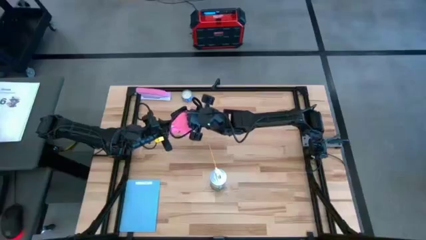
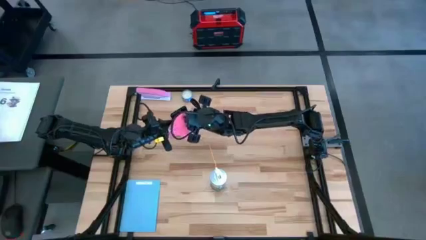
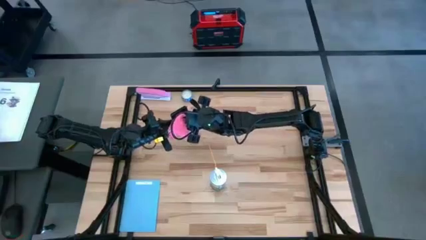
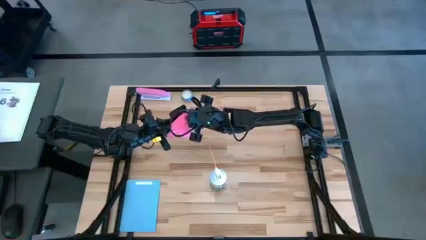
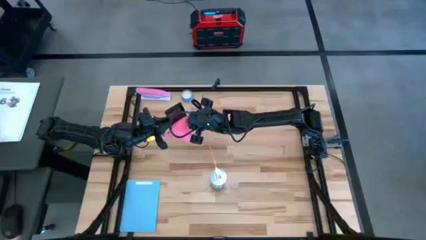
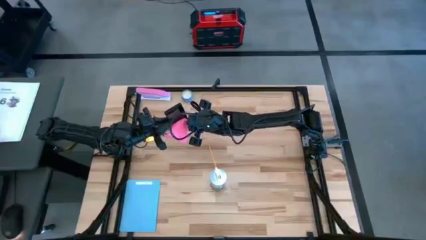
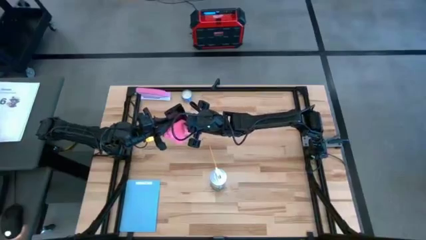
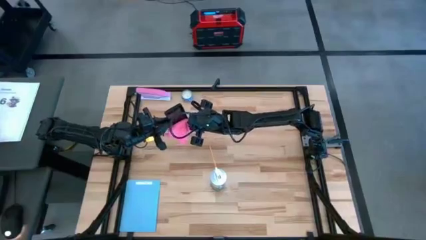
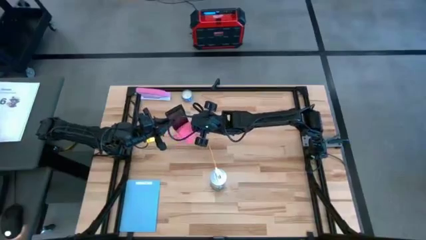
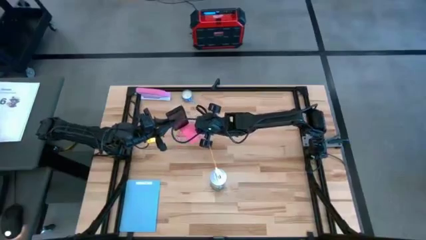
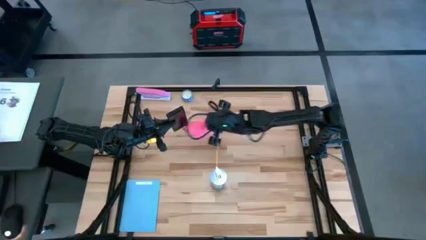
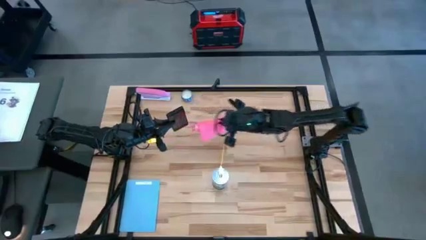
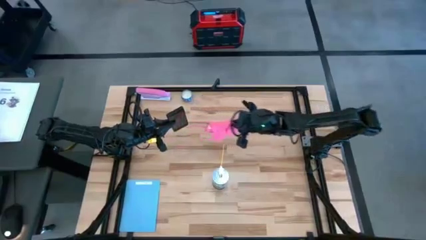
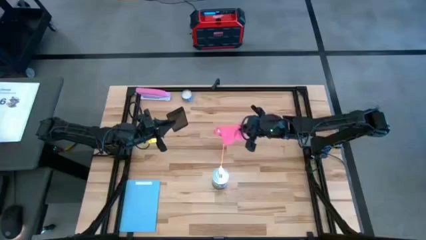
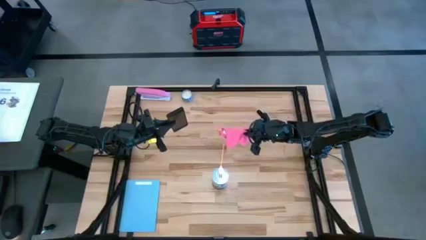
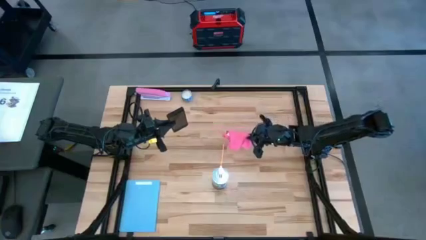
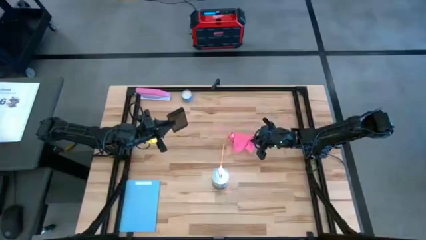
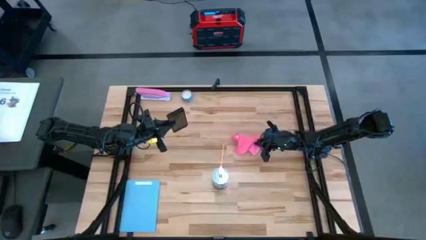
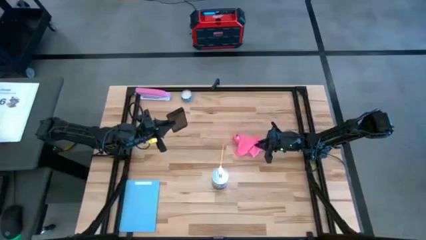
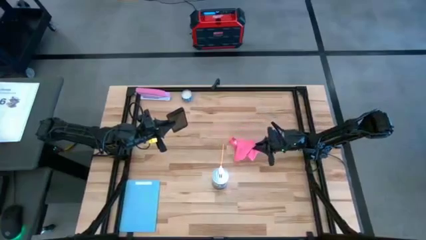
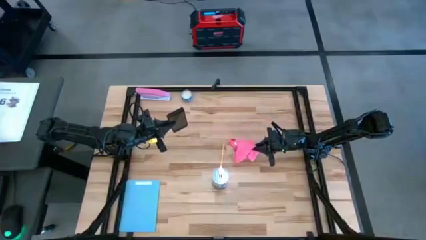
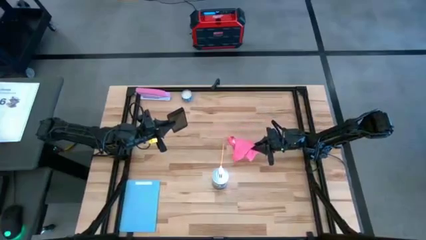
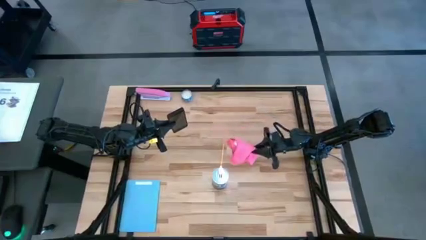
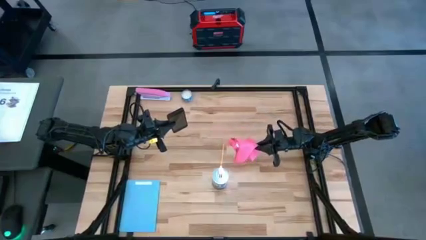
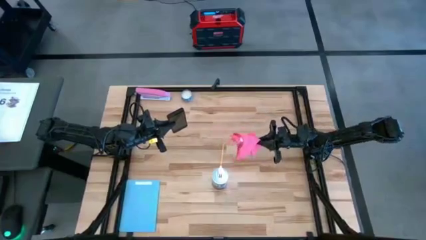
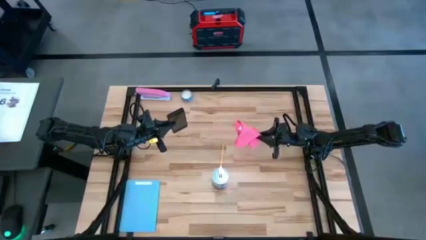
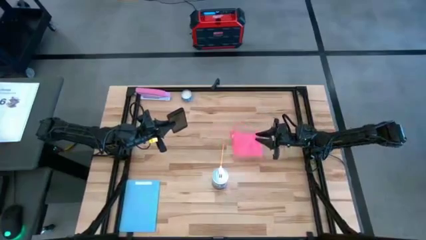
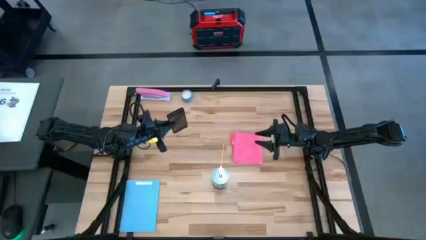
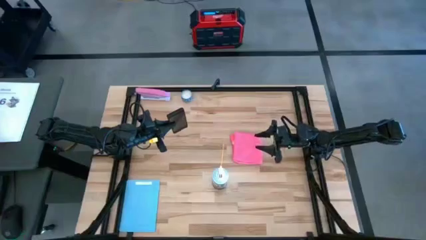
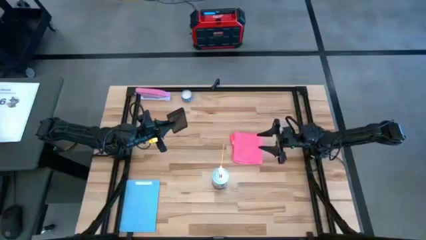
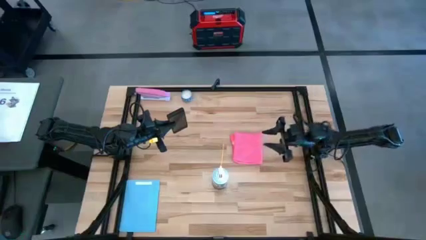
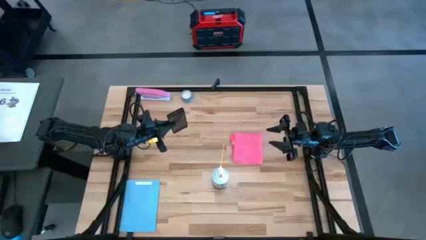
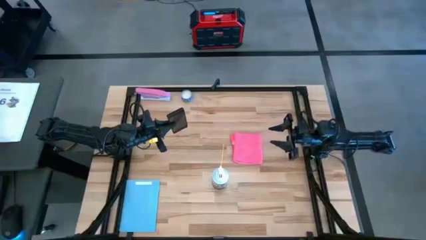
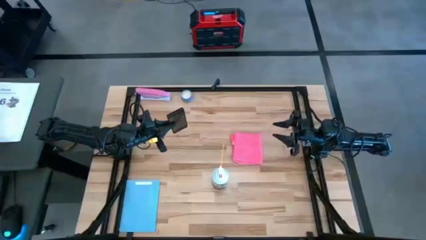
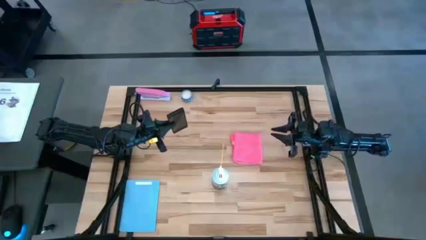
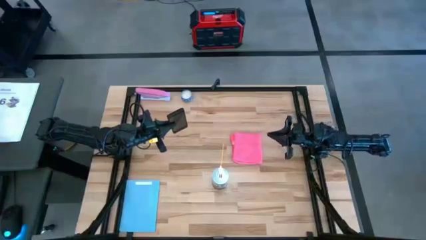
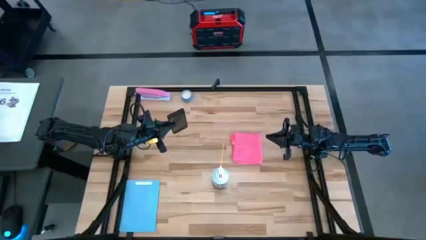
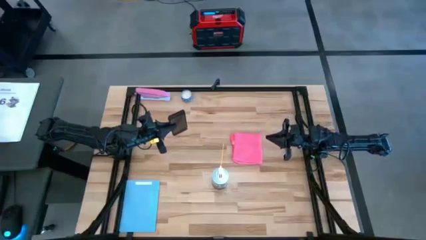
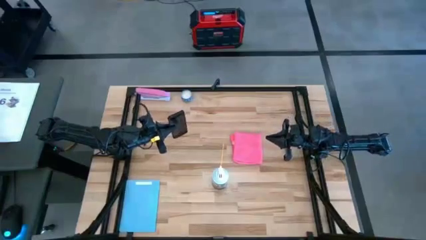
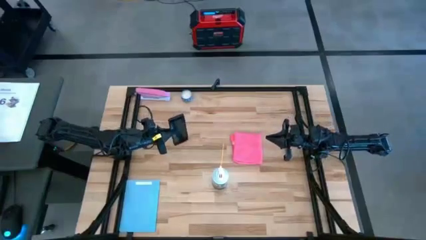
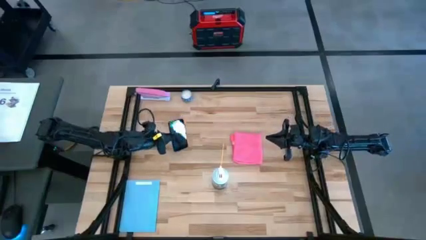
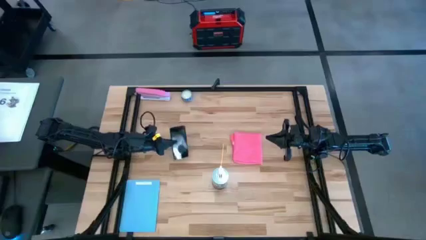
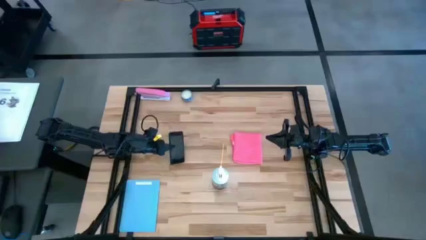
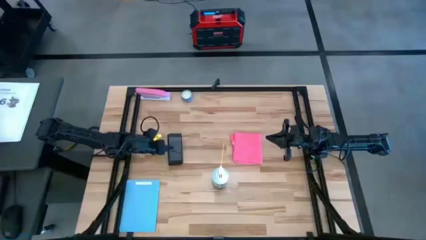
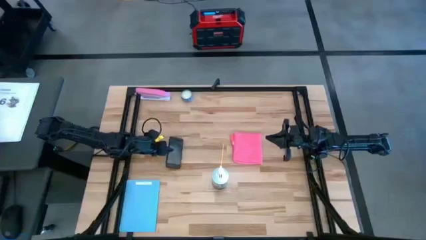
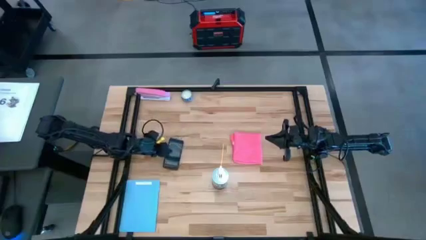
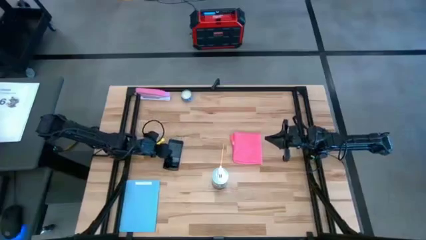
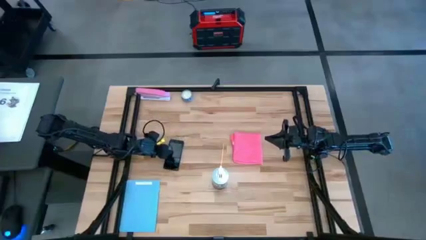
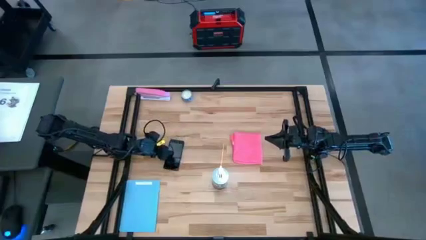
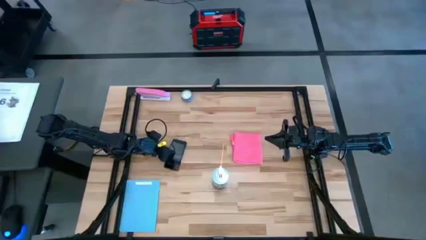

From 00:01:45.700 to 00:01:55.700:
Task: Apply microfiber cloth
Wipe the front of the black cellphone with the pink microfiber cloth

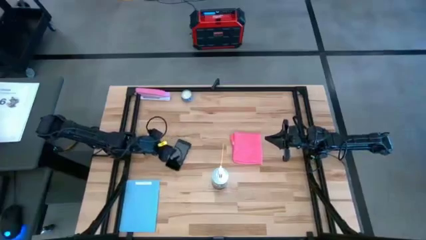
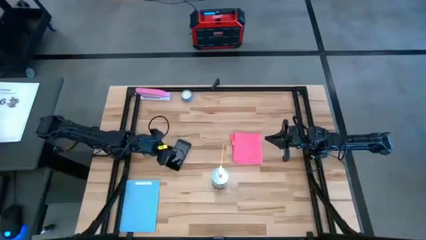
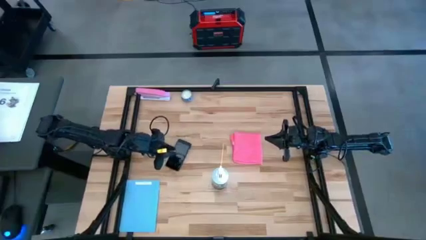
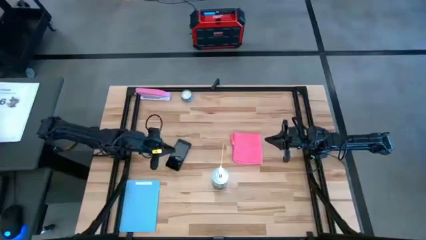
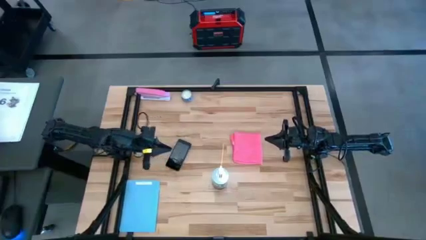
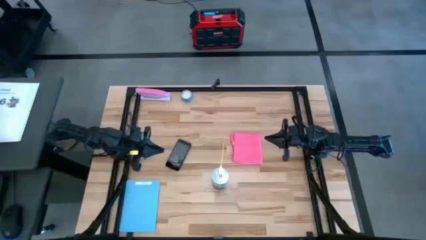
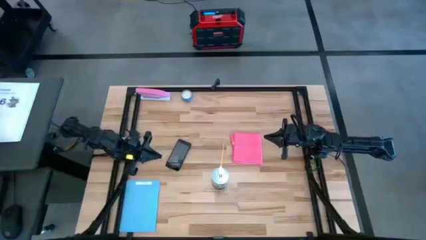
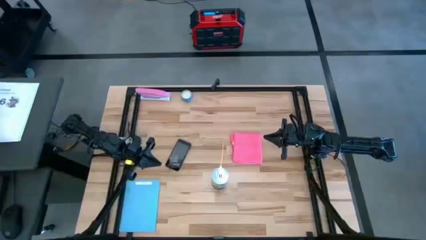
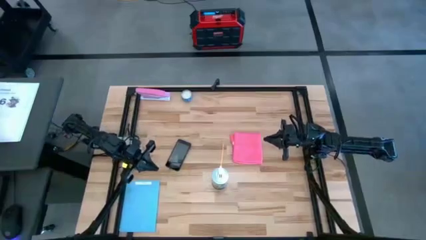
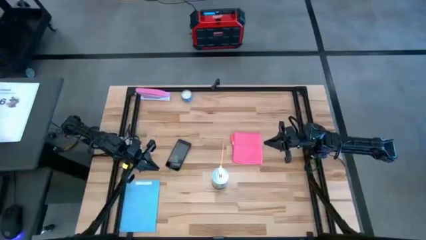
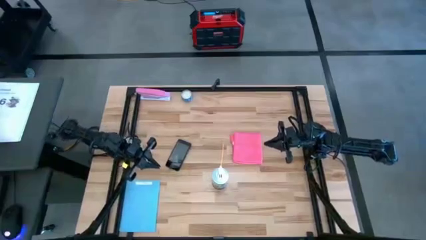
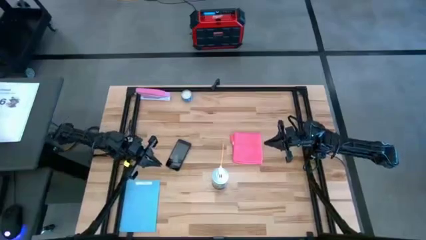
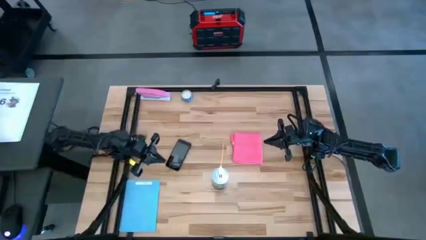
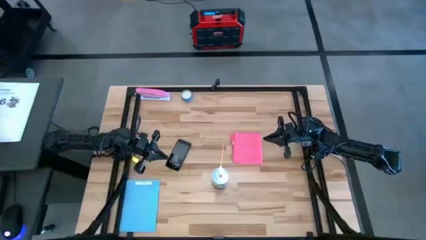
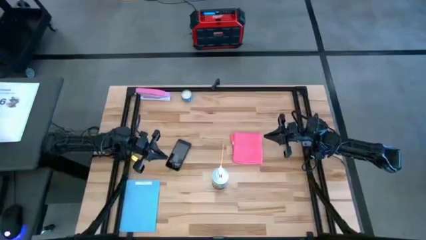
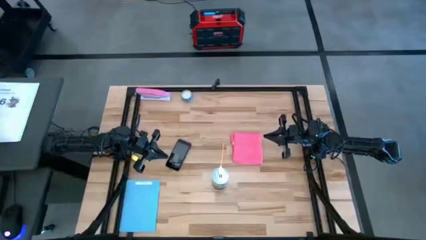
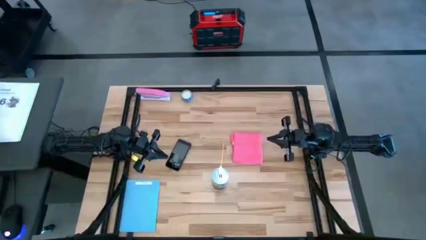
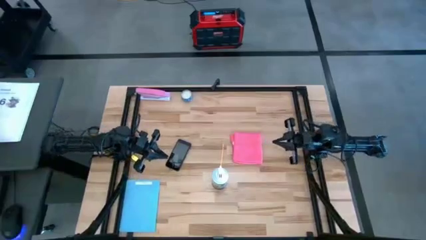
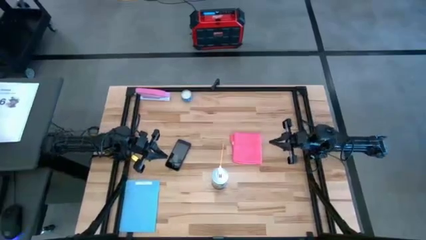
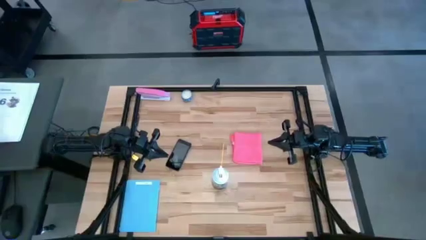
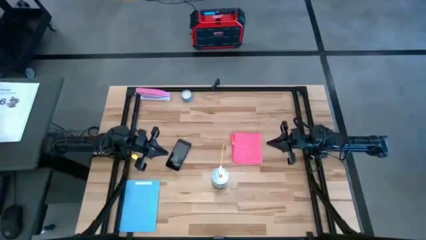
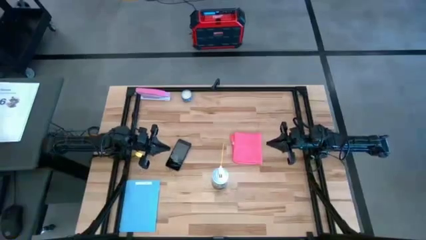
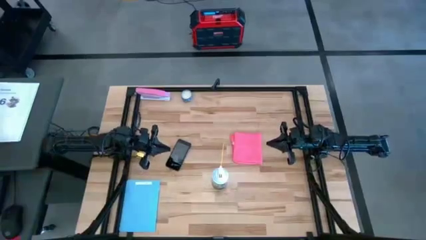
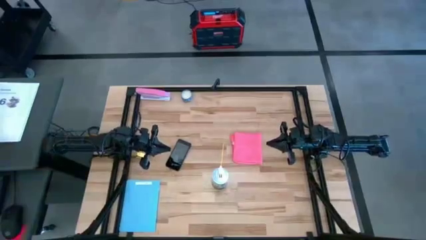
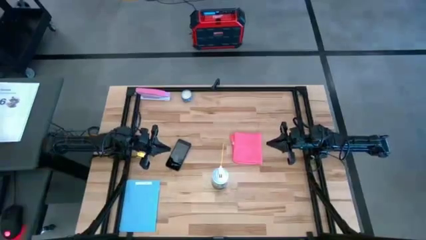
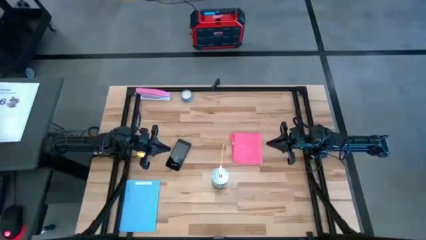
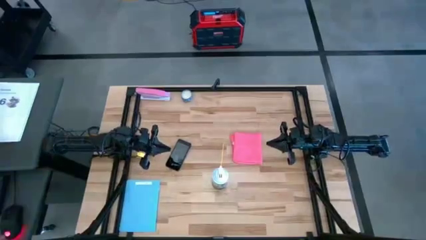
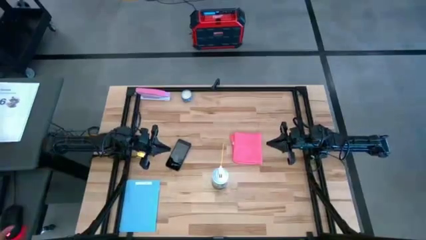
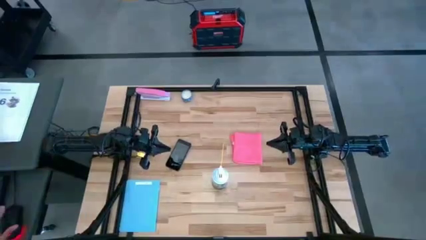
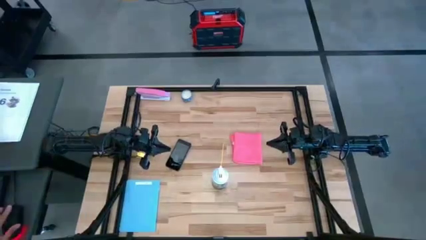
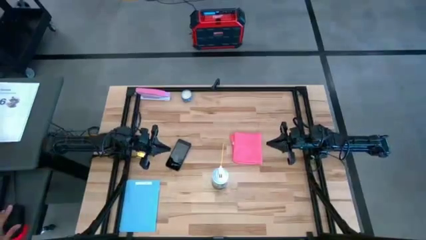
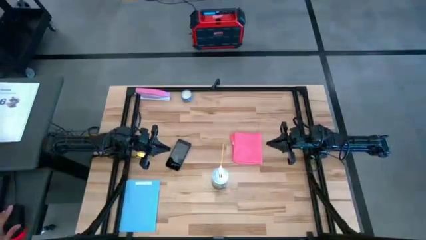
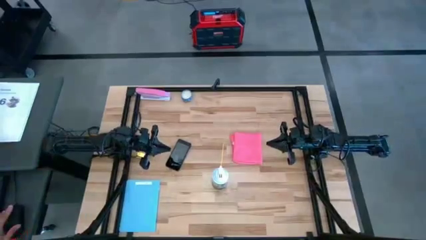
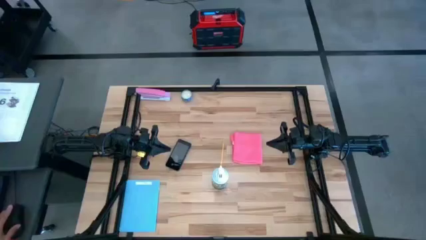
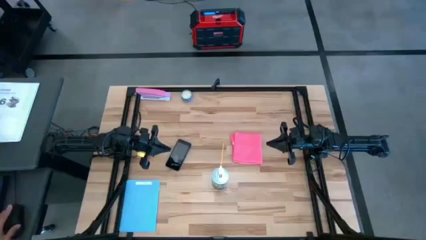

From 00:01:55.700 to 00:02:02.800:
Return to Home Position
